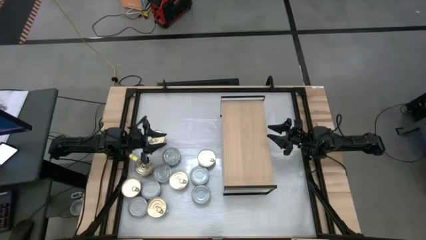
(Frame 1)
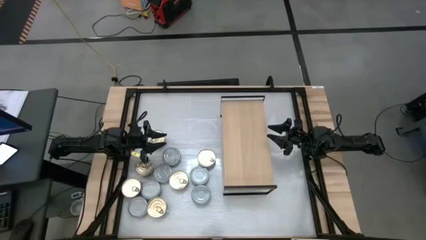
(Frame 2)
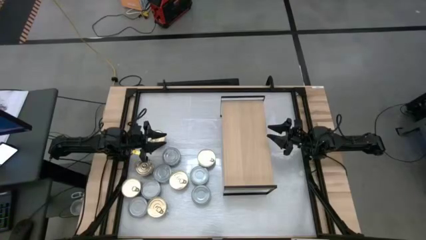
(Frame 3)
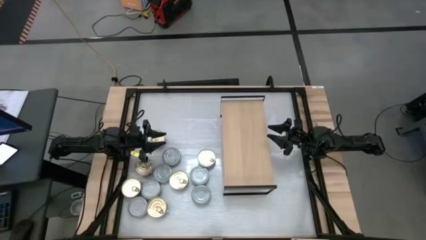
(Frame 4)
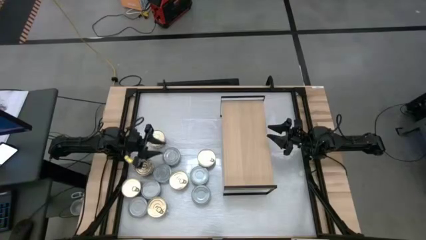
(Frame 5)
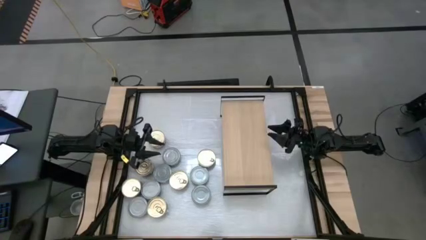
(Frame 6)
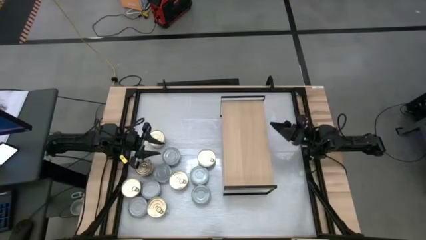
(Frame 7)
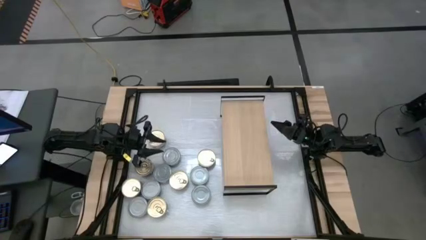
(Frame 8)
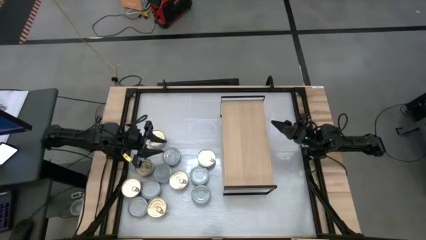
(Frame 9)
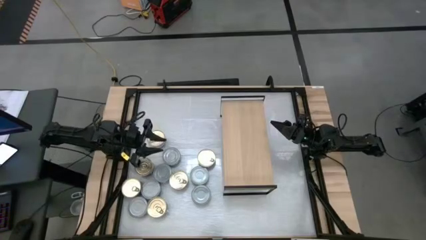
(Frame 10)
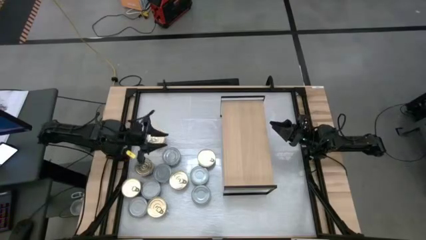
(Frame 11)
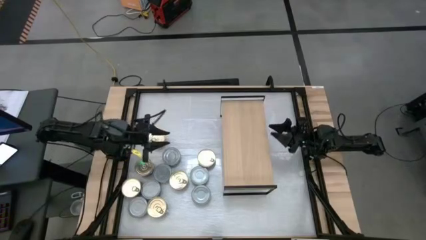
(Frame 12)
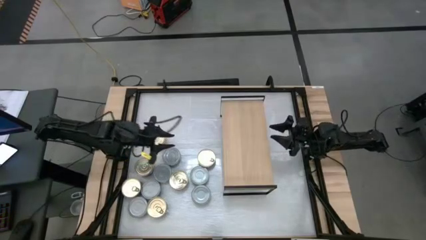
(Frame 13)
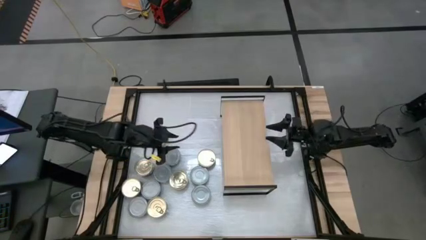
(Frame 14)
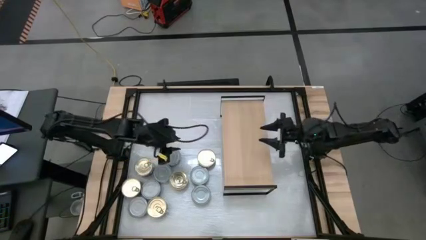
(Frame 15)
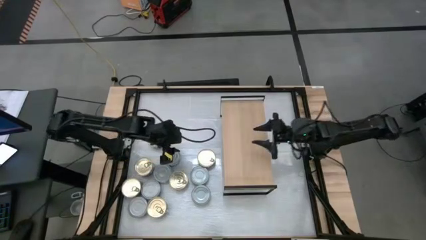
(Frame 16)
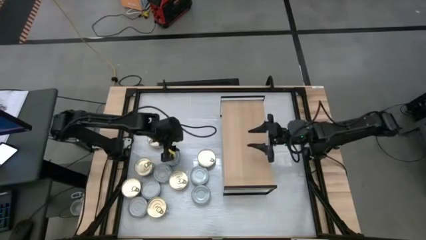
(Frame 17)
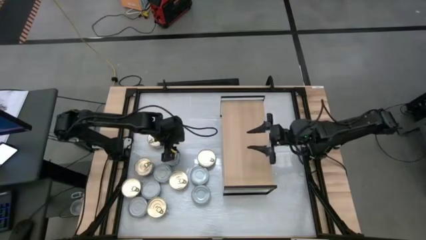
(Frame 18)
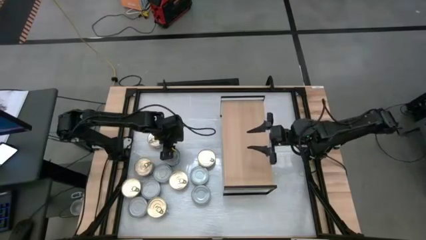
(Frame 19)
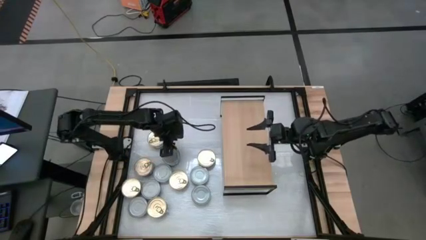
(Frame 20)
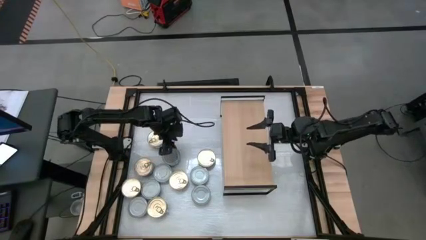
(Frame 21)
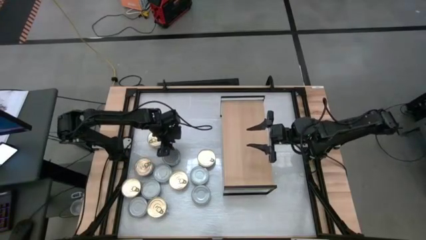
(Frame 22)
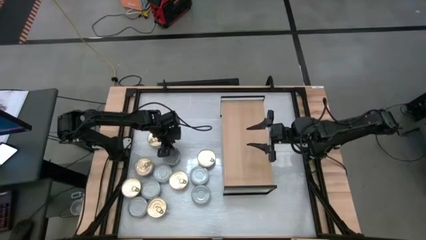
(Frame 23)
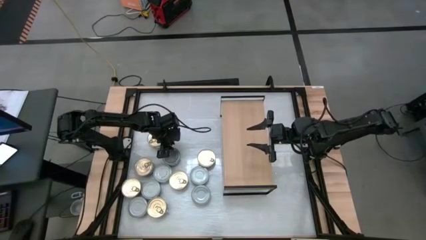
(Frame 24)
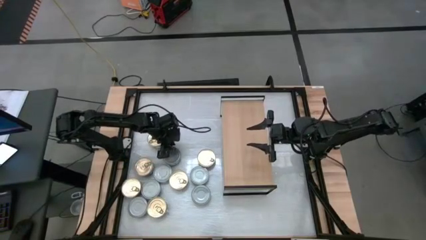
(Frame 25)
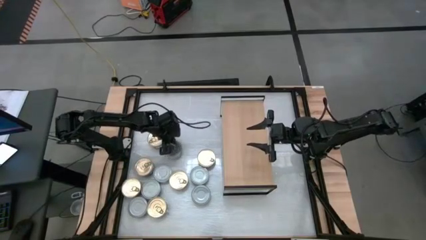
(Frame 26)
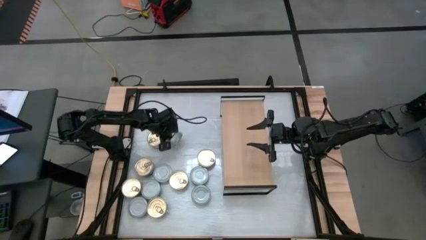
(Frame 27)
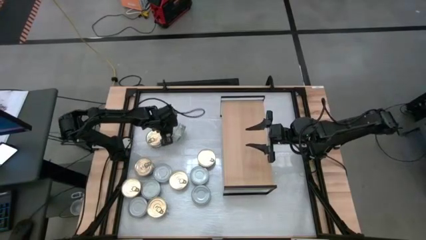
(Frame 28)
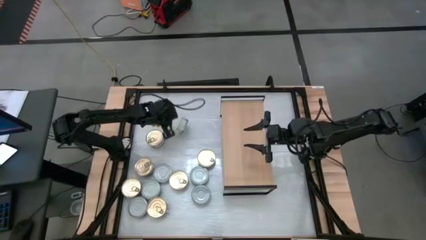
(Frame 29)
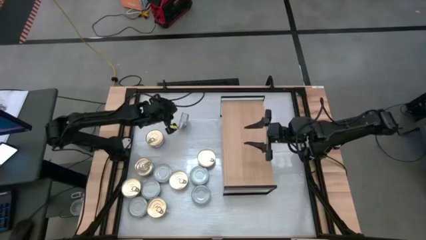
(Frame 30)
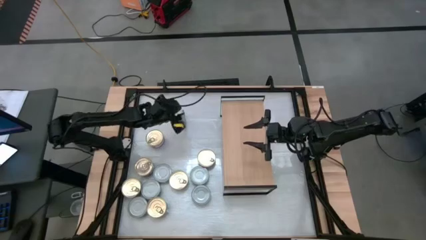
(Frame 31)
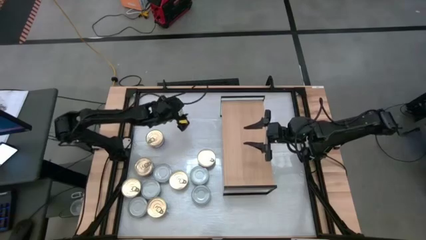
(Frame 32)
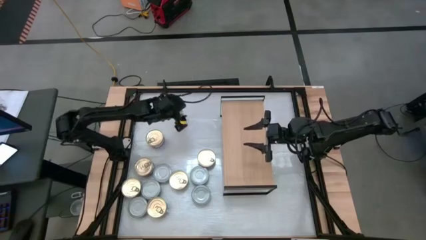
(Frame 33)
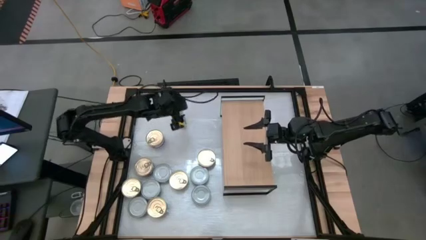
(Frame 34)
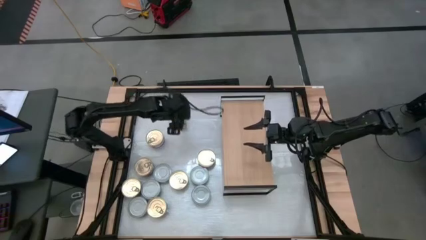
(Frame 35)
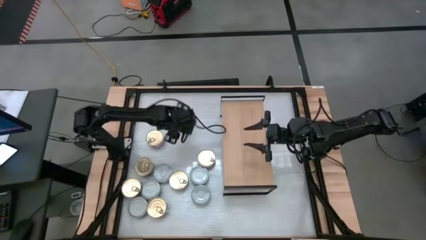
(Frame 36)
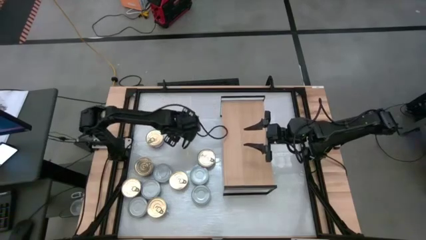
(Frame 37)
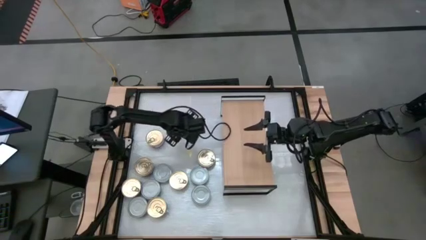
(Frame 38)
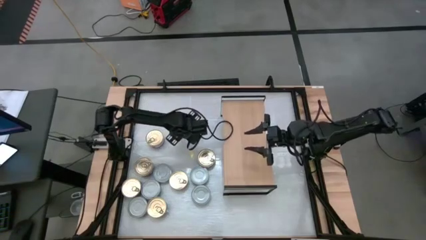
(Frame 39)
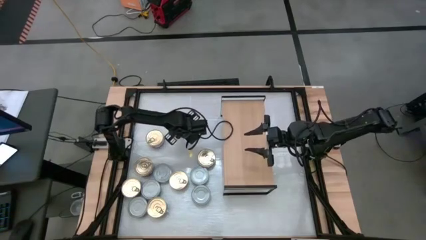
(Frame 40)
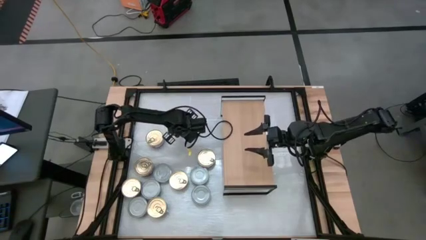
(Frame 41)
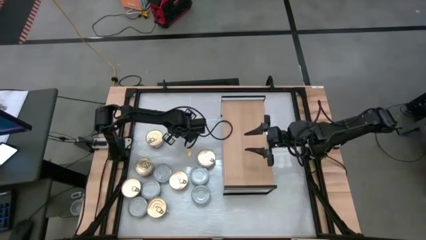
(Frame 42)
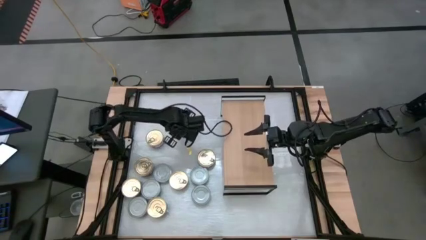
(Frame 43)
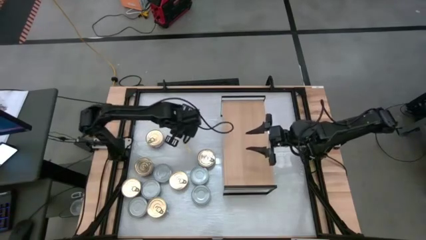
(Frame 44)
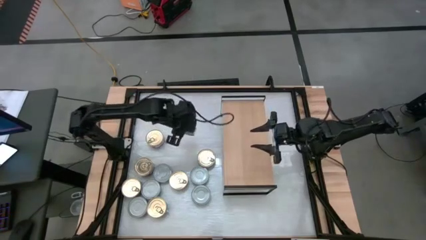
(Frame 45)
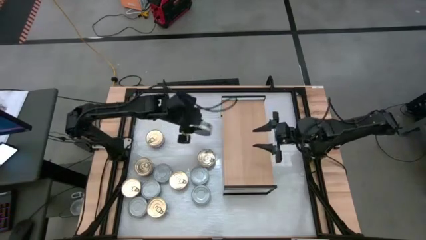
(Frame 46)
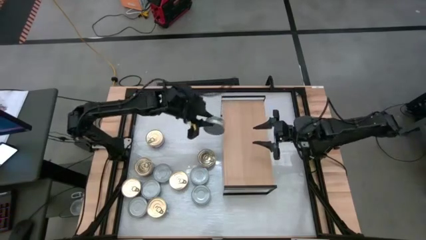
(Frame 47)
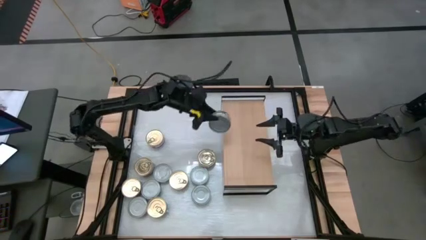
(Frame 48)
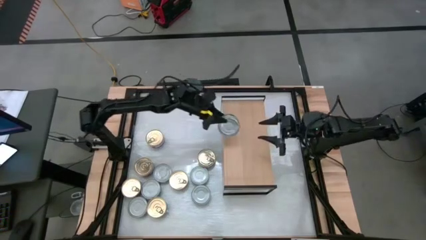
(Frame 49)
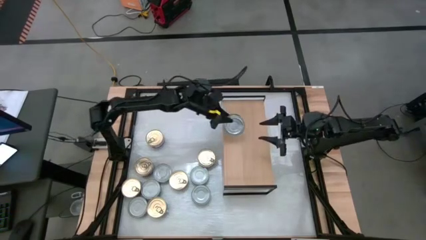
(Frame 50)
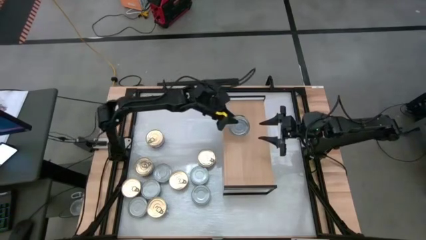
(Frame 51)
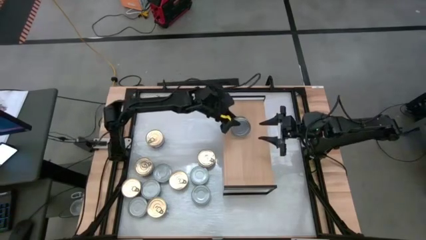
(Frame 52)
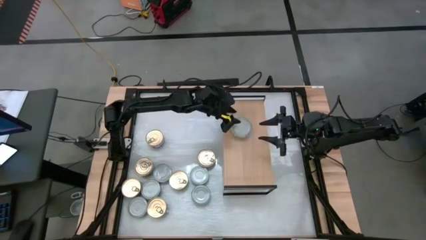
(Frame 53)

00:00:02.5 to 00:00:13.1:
Task: Stack canned seafood by type on shelf
Put the green can on the shelf

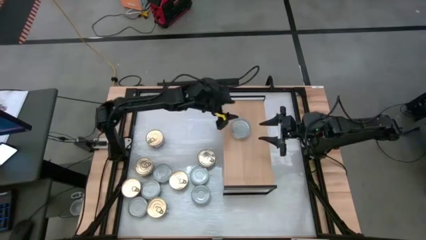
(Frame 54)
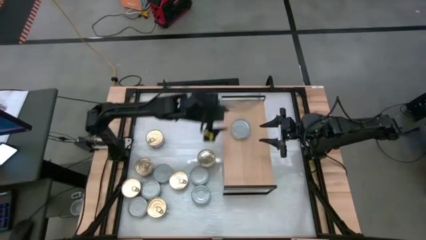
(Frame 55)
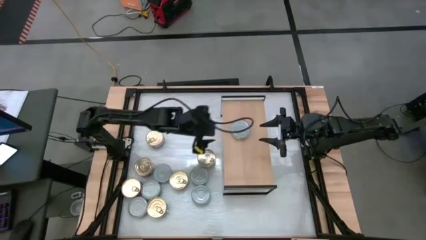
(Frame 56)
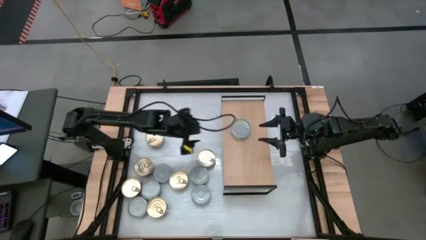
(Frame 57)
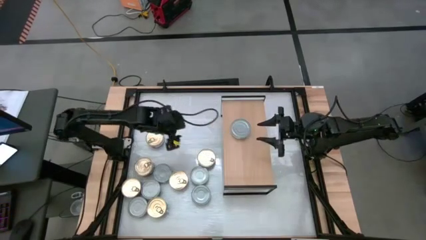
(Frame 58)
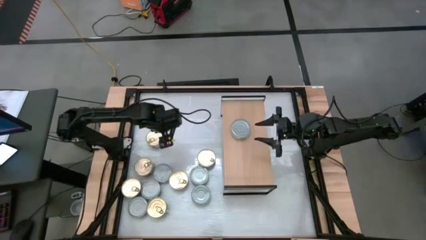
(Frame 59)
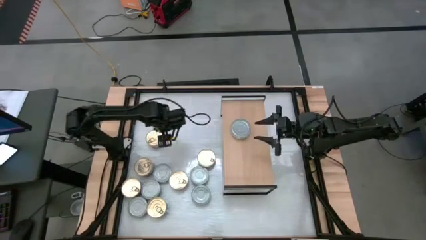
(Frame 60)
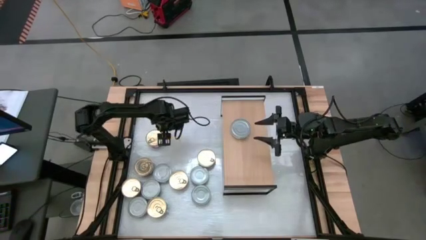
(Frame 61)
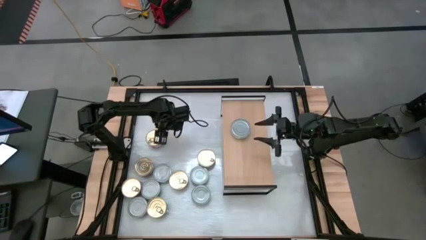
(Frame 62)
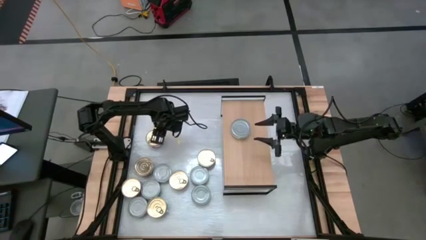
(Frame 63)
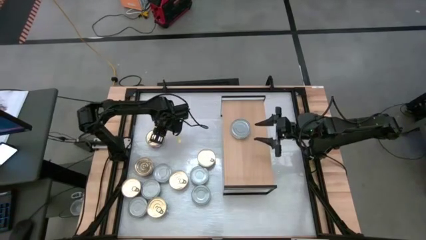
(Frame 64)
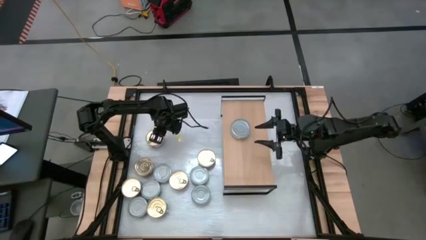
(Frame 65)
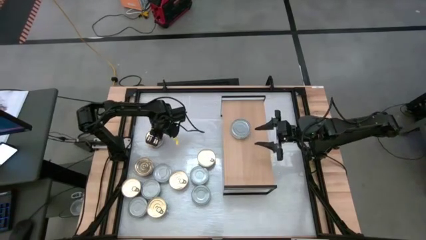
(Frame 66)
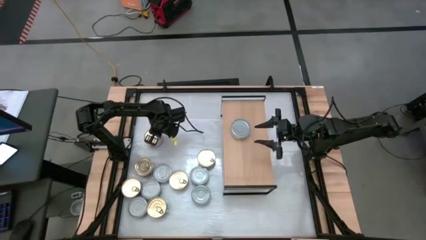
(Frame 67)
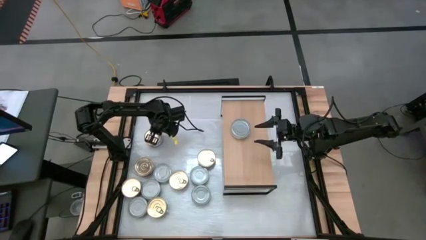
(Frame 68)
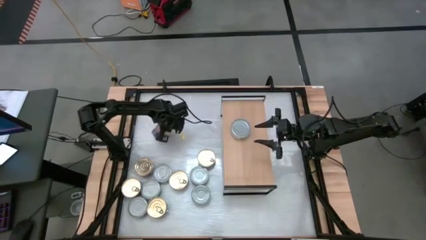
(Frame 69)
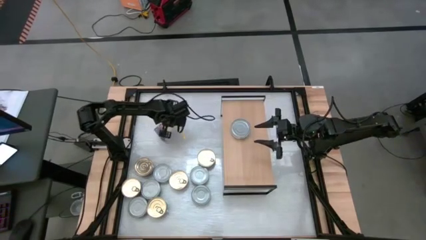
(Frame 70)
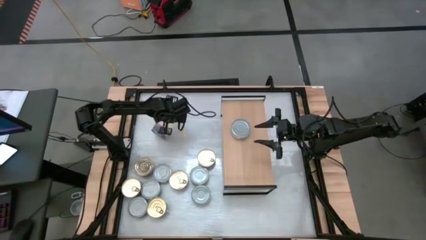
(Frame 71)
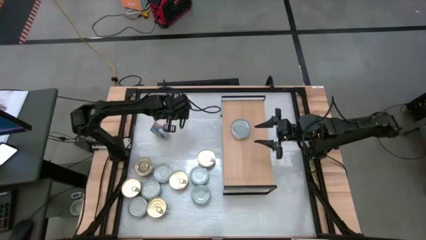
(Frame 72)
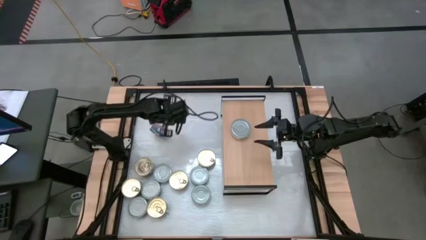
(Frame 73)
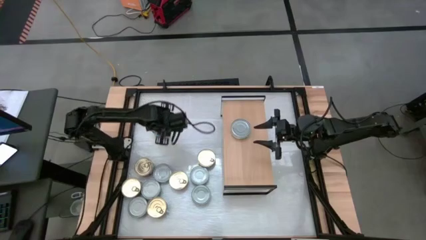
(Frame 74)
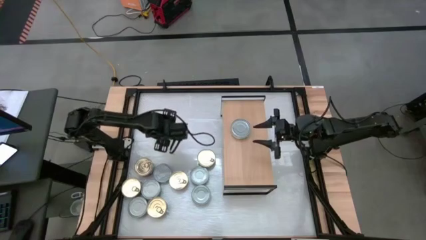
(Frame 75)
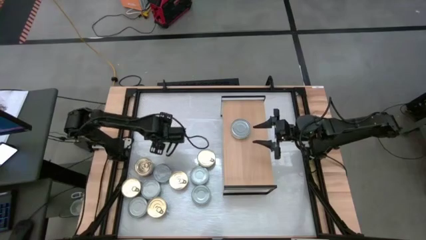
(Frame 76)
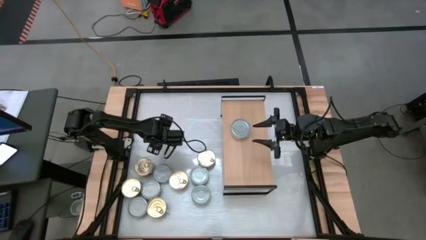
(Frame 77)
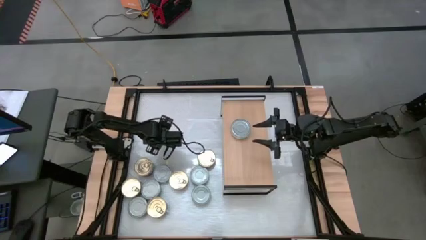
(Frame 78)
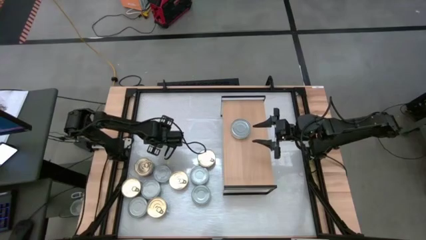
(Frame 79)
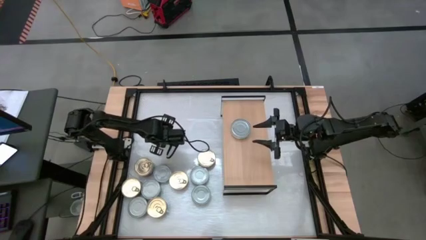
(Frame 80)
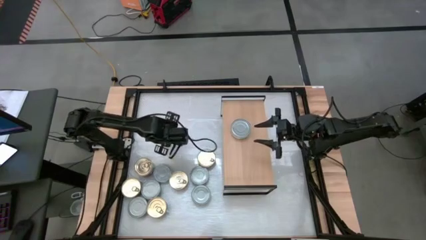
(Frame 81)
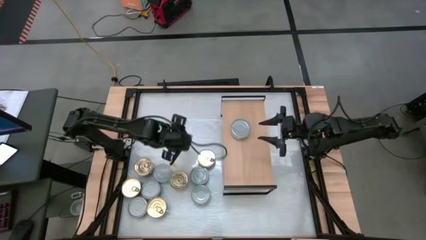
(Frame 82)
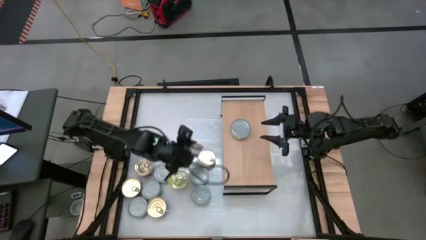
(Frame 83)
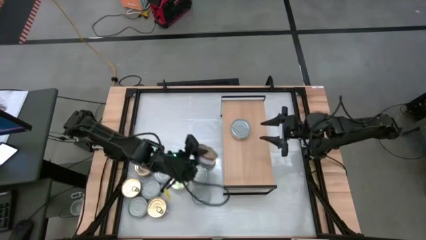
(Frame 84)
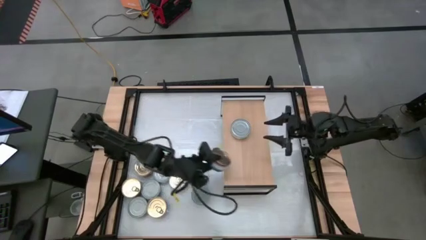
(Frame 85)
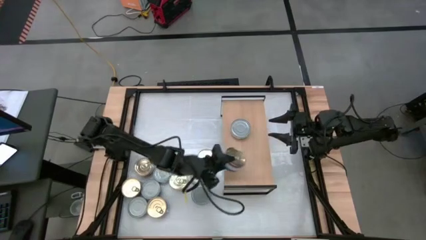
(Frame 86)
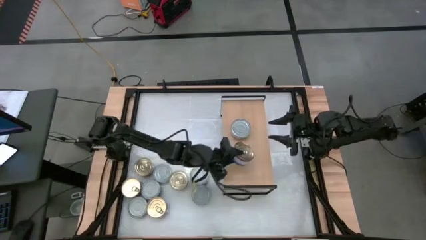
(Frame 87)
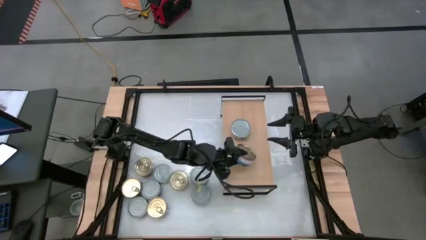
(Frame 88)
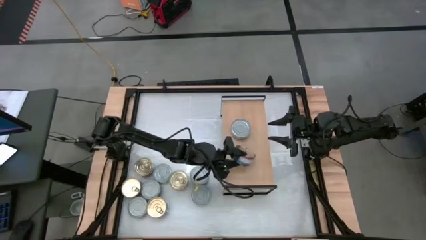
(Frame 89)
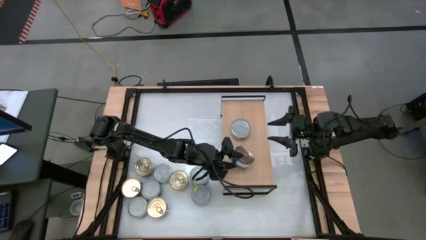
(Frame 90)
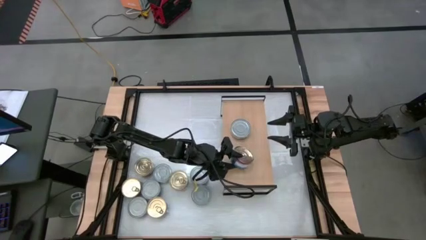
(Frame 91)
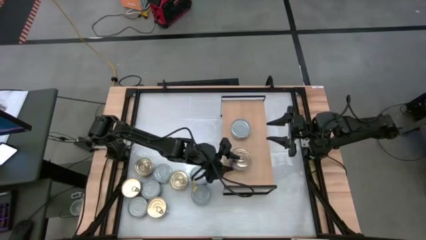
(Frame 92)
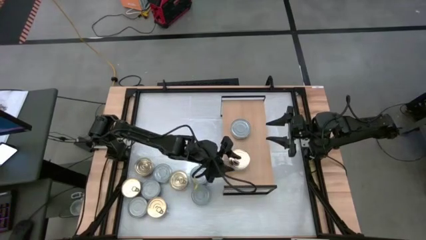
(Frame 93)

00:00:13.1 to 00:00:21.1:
Put the blue can on the shelf
